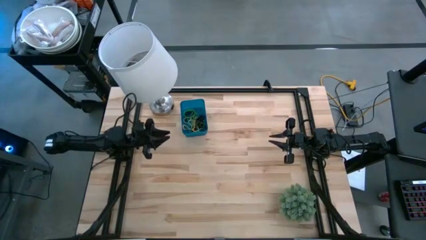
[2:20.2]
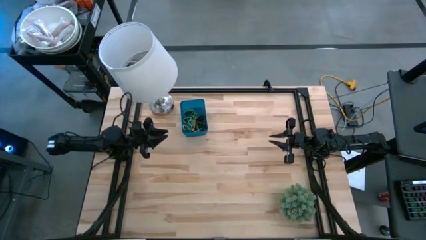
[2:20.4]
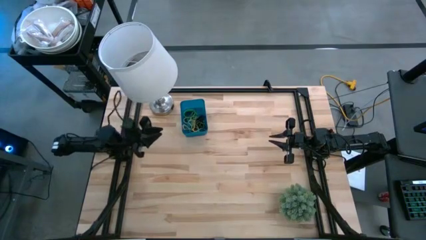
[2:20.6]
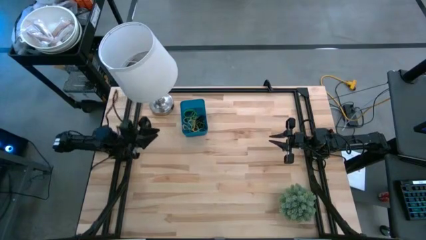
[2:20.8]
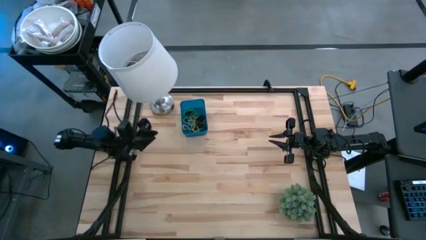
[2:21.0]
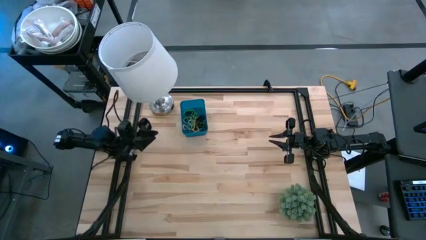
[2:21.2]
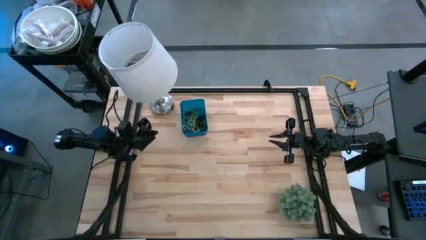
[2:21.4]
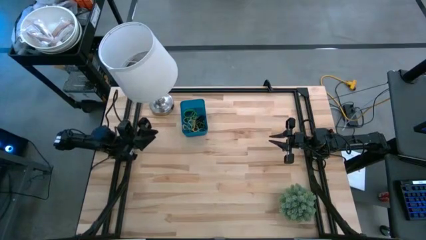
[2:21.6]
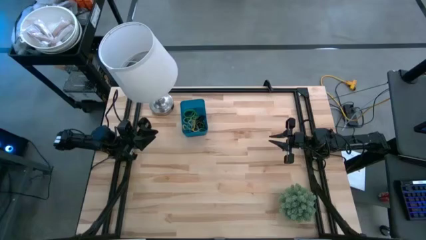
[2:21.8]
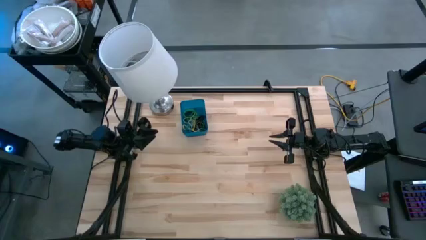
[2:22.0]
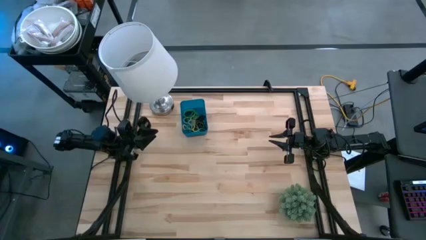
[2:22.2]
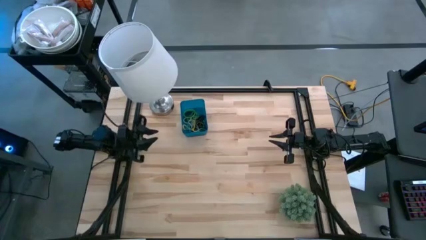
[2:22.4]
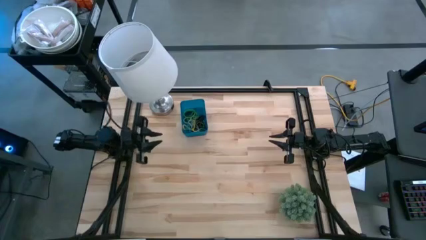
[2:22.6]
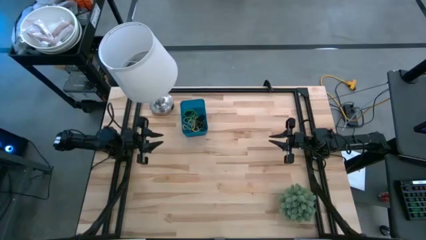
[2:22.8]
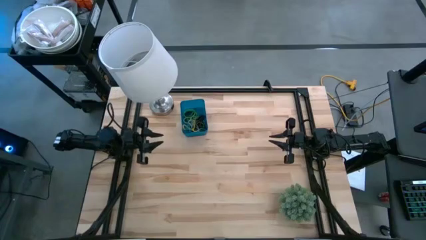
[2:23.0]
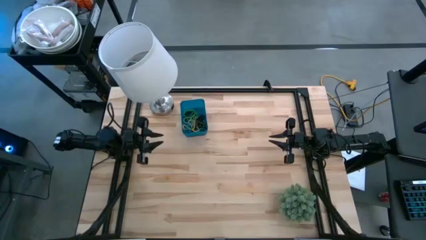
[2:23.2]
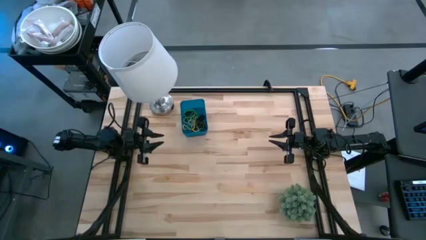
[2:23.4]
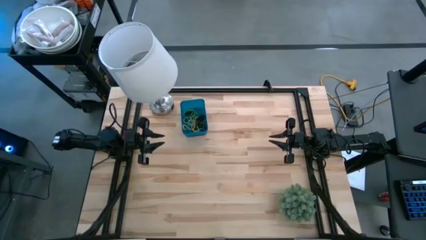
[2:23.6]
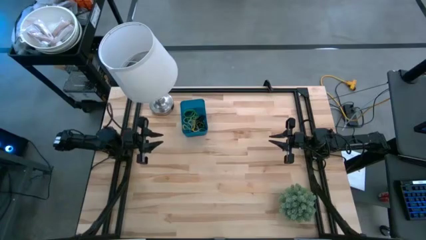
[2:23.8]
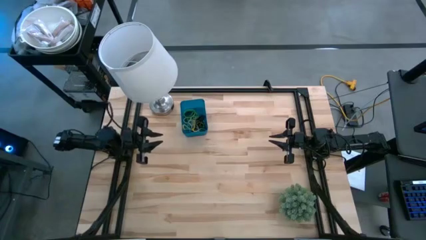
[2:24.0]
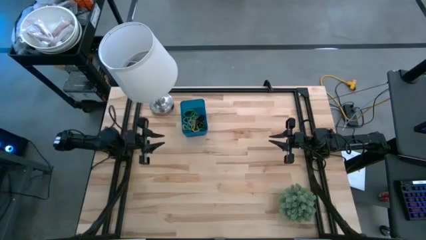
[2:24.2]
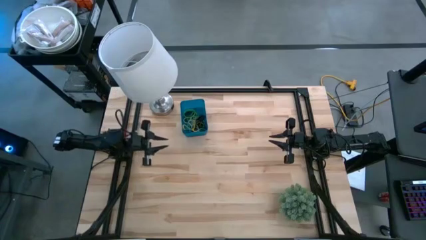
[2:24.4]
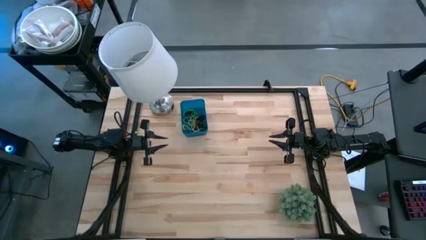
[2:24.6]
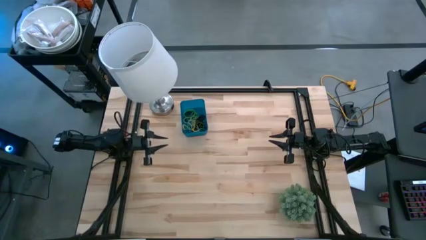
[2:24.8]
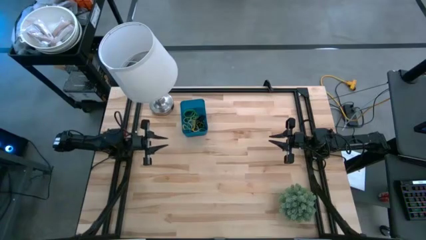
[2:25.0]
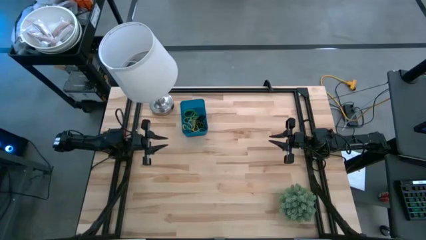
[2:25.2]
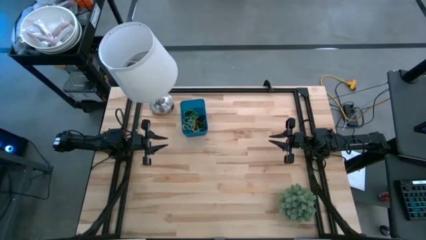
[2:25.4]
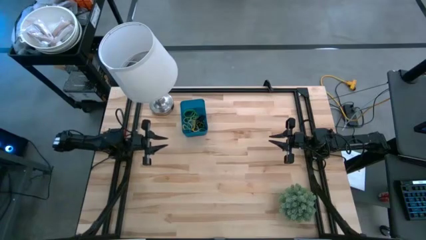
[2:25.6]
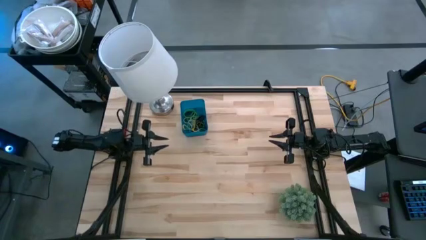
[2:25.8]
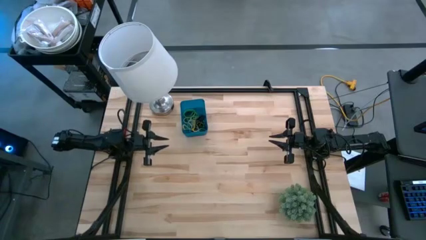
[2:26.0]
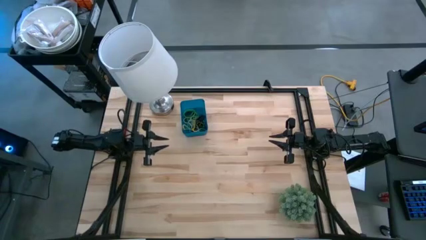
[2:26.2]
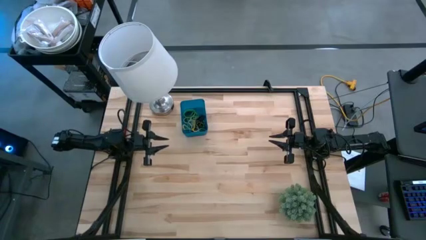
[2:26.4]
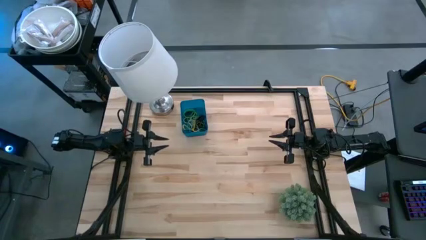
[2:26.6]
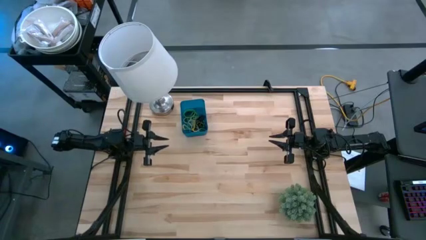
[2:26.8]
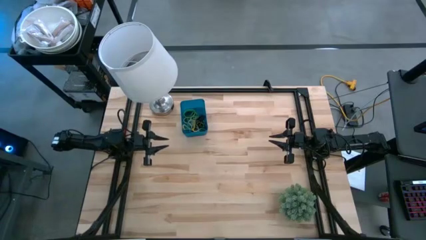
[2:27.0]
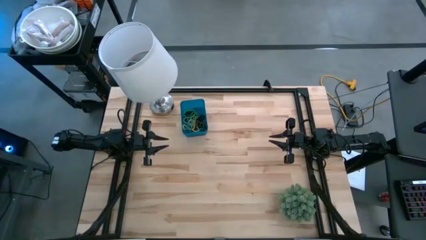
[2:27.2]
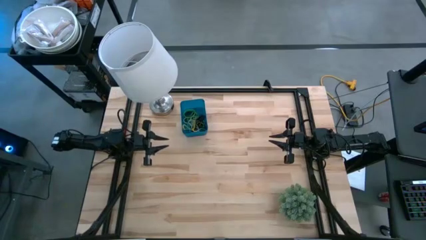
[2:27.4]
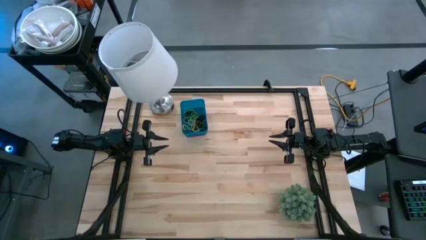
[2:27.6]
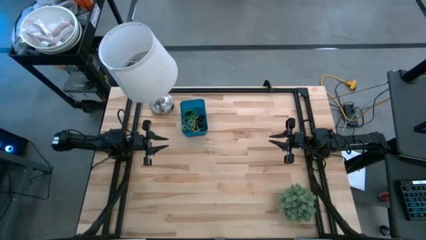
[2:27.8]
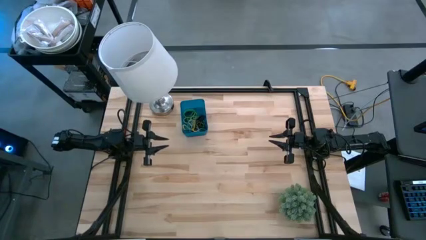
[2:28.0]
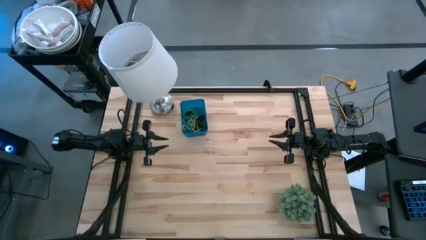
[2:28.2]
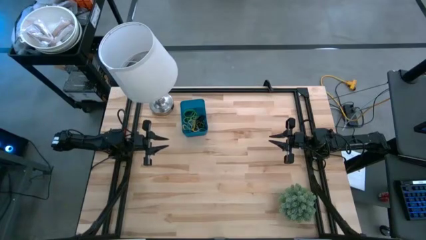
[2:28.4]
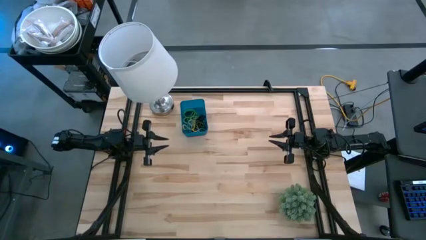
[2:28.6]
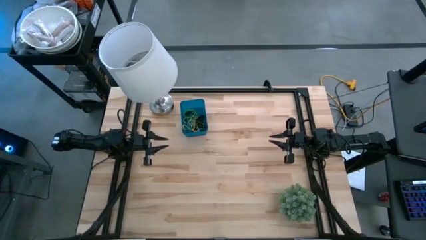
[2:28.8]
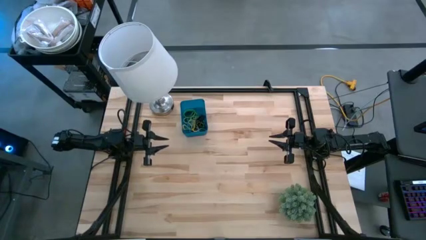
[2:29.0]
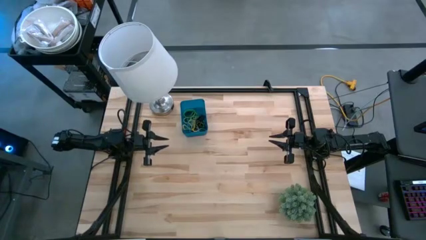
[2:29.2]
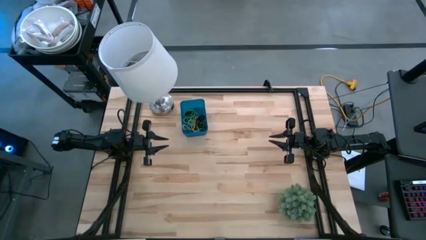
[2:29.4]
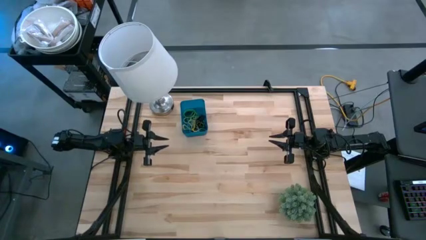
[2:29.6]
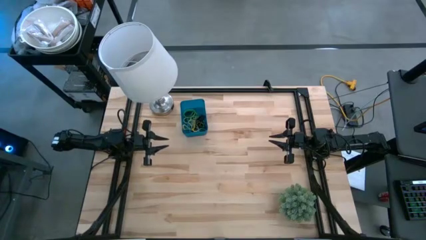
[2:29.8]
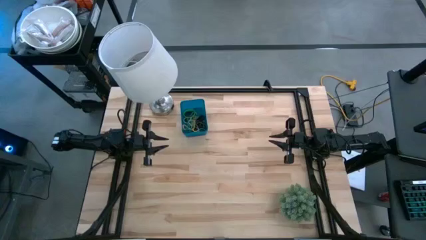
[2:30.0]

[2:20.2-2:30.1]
Task: Pick and place rubber bands into bin
Return to Home Position

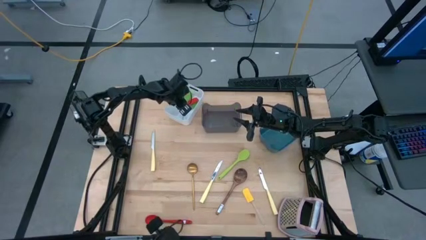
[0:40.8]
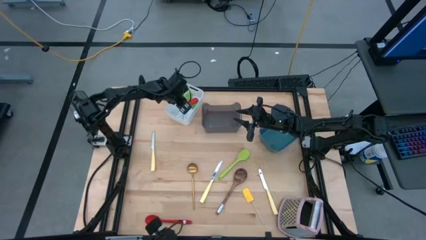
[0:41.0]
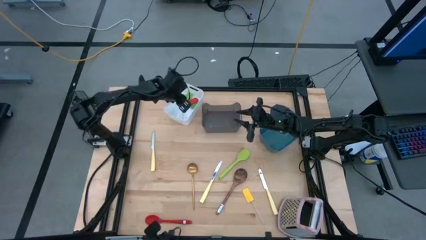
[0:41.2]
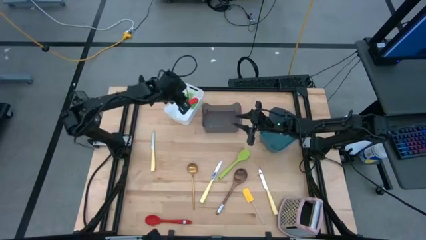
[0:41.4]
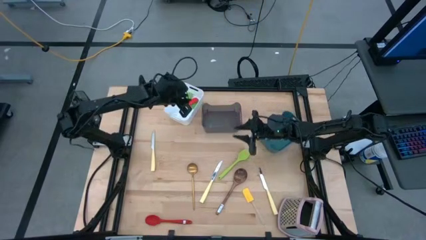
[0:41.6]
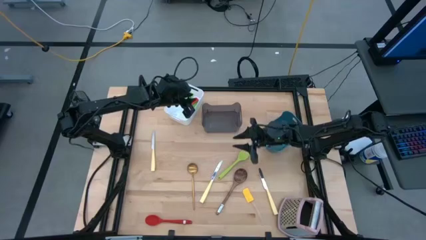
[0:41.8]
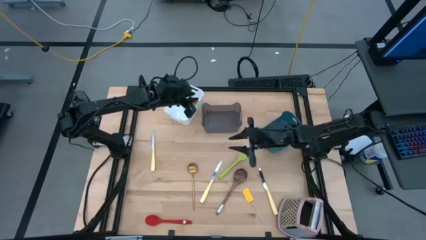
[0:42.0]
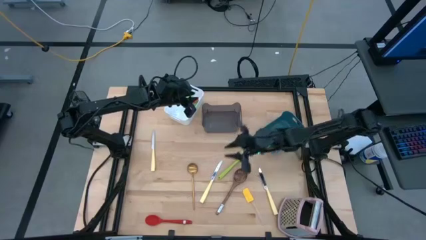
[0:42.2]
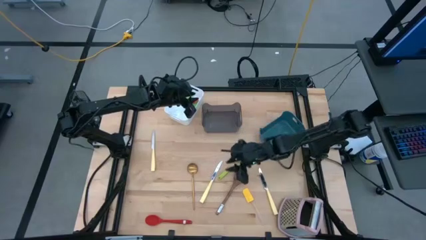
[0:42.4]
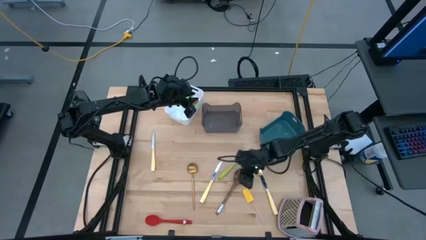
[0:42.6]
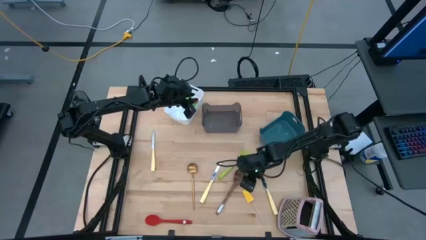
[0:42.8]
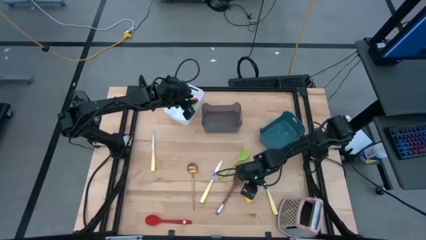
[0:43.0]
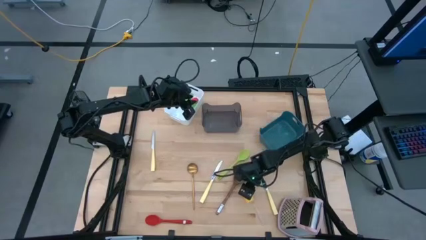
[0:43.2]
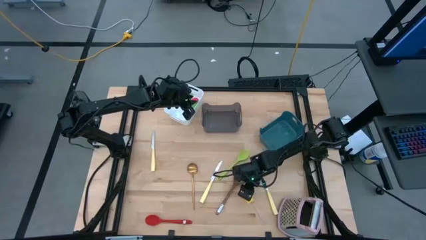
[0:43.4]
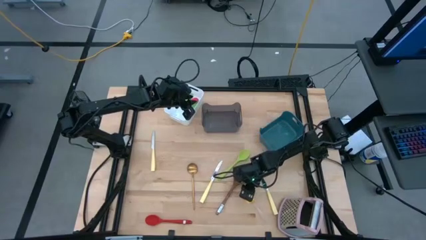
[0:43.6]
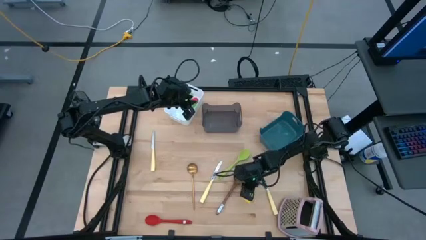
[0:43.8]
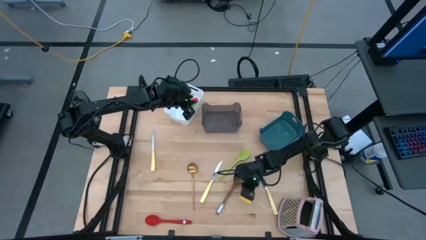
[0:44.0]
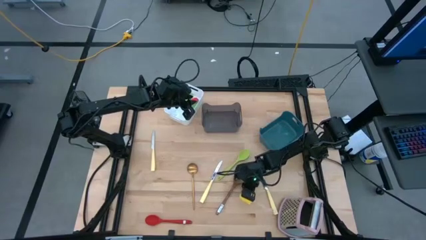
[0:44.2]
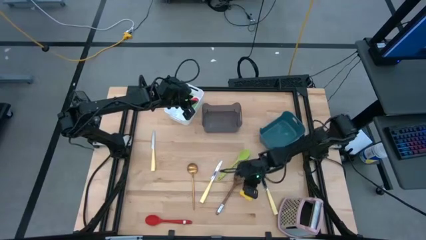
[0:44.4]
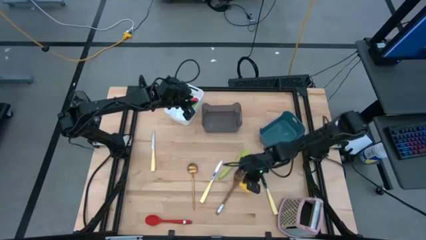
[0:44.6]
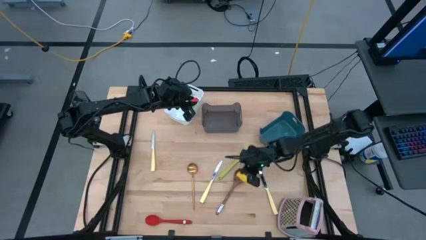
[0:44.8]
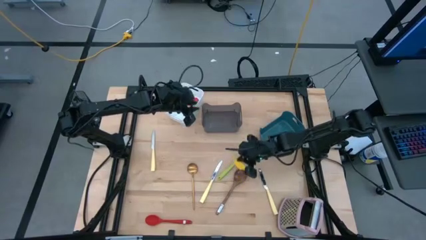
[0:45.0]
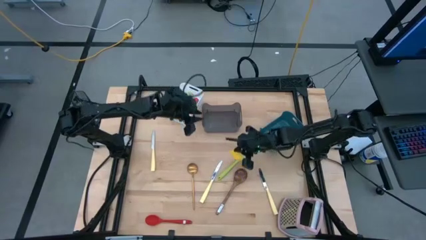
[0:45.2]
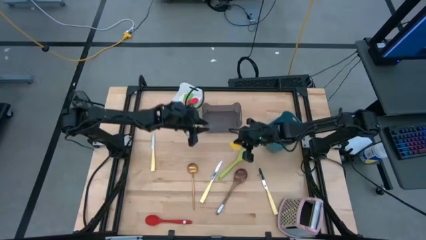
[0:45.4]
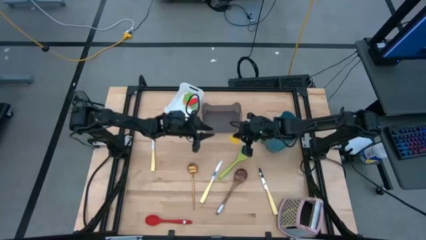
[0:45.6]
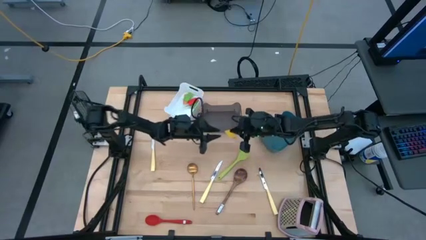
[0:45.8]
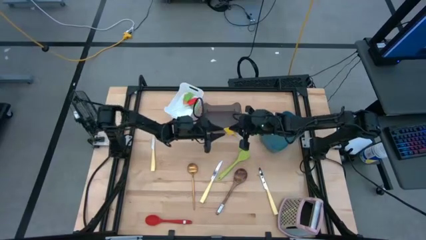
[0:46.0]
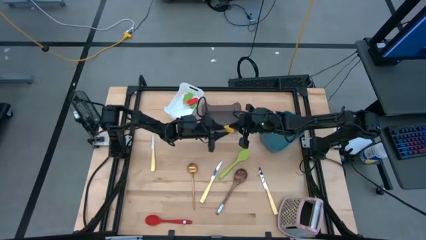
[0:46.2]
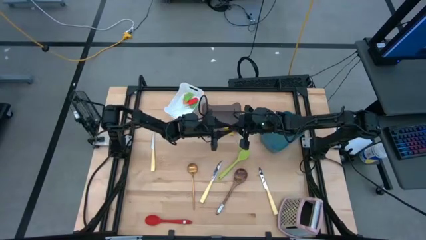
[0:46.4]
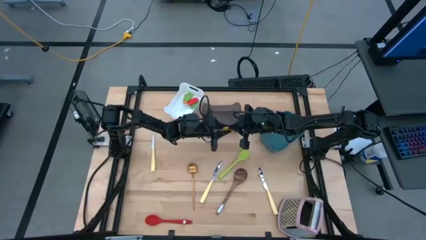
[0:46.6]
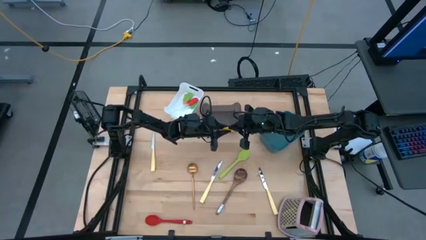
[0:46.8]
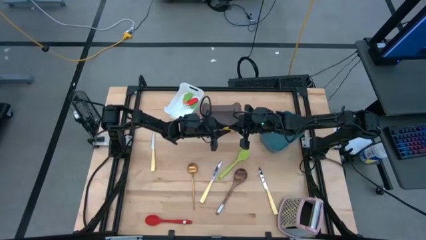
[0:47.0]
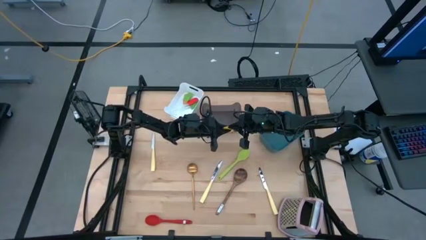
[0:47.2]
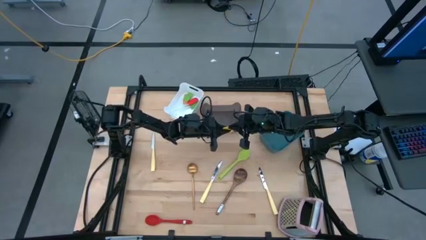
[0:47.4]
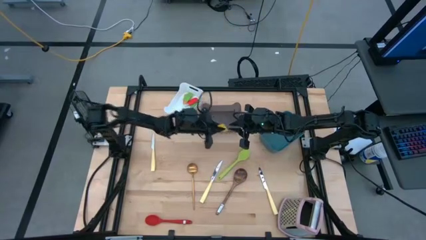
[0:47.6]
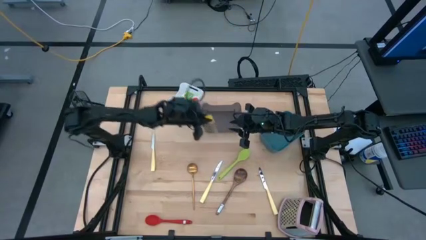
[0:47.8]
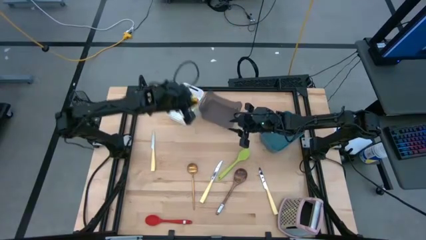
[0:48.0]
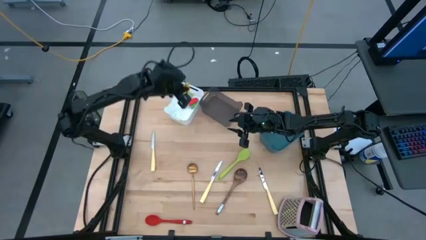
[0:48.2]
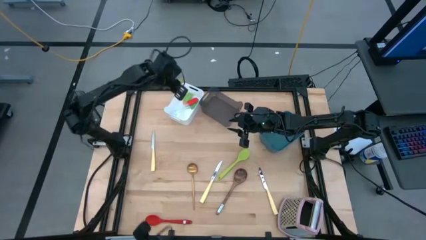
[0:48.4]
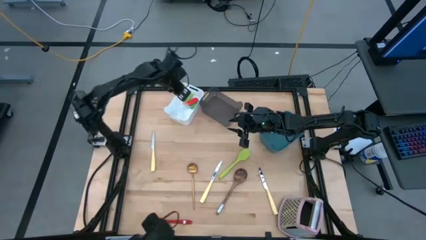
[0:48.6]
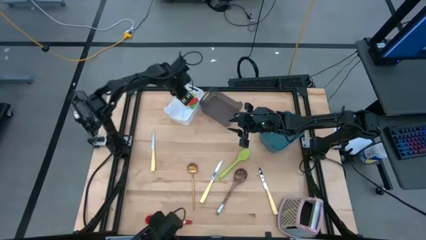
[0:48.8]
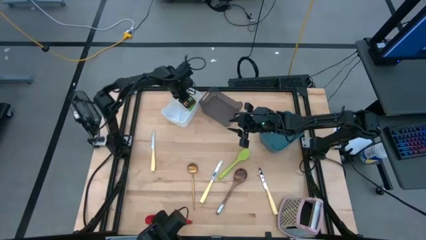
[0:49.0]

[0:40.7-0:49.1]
Task: Pick & Place Kitchen Items
Put the yellow spatula into the white bin
